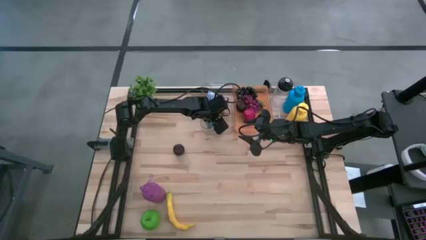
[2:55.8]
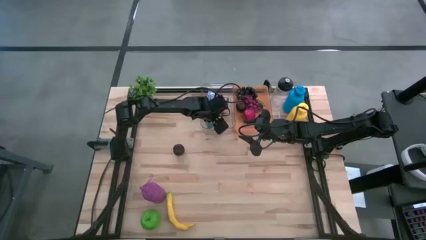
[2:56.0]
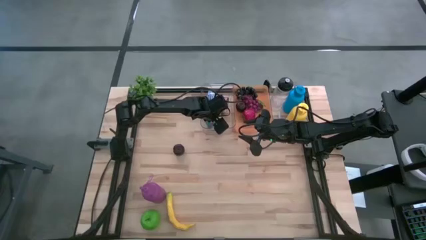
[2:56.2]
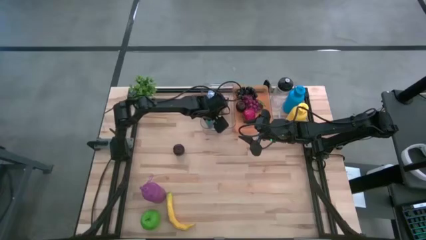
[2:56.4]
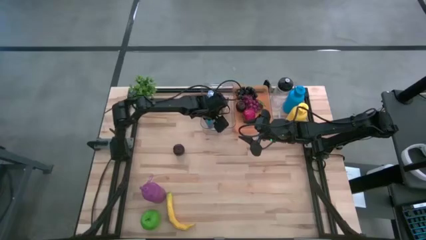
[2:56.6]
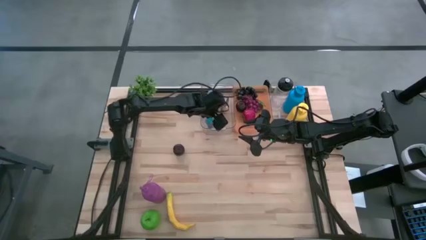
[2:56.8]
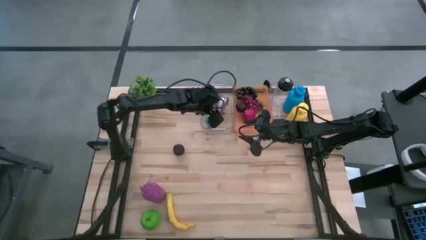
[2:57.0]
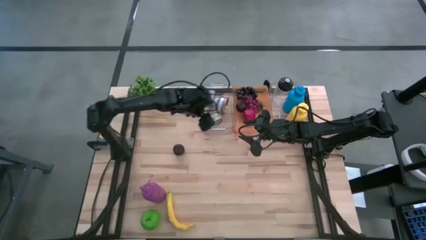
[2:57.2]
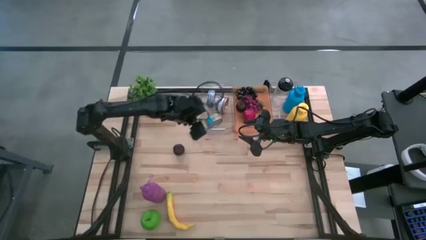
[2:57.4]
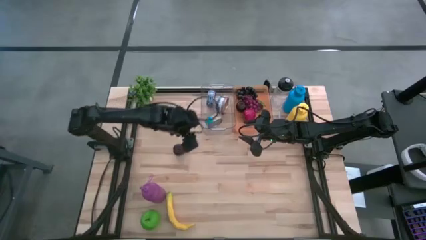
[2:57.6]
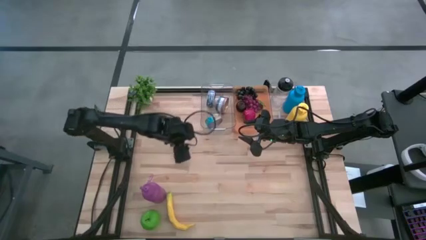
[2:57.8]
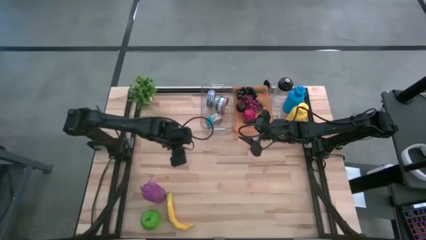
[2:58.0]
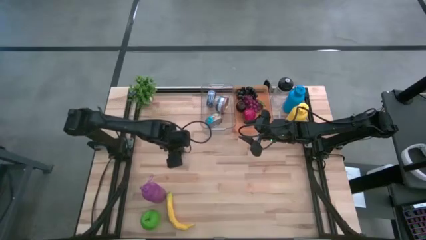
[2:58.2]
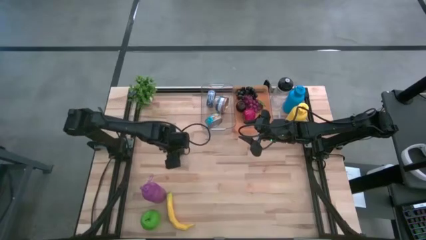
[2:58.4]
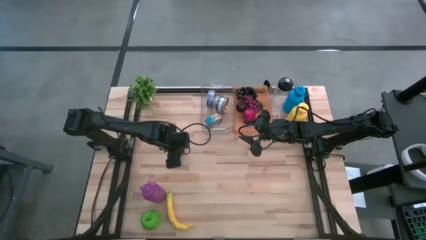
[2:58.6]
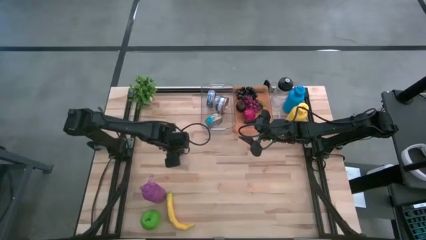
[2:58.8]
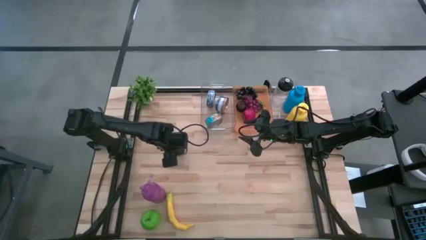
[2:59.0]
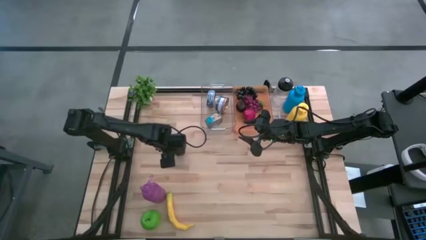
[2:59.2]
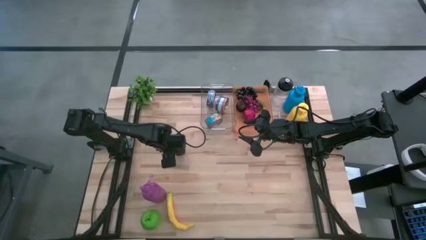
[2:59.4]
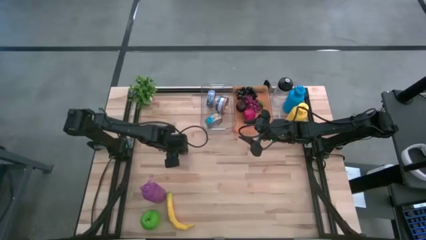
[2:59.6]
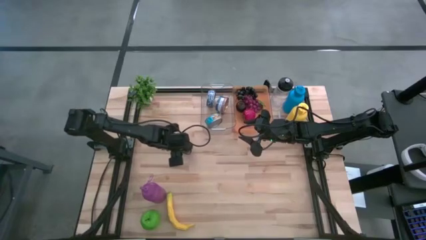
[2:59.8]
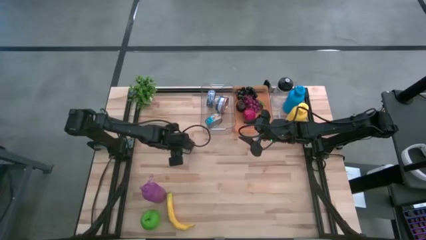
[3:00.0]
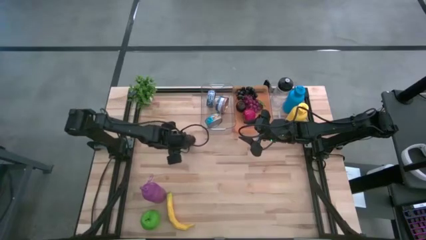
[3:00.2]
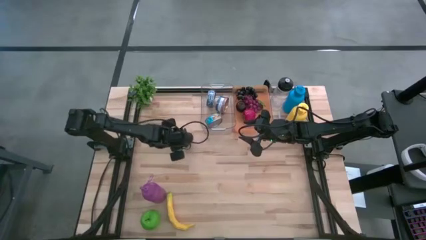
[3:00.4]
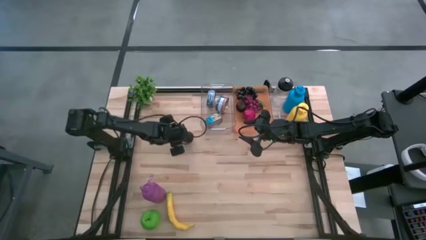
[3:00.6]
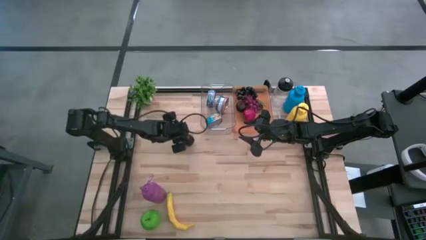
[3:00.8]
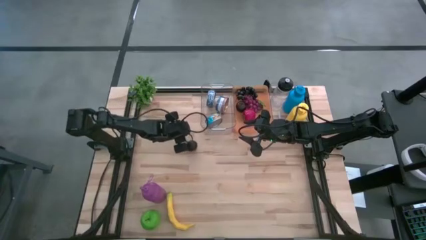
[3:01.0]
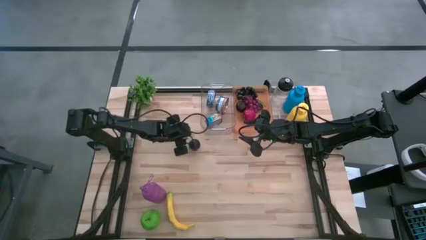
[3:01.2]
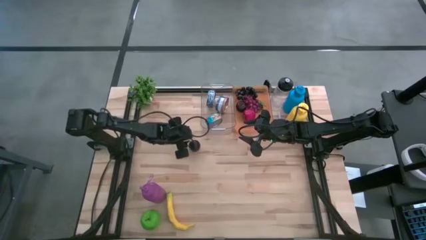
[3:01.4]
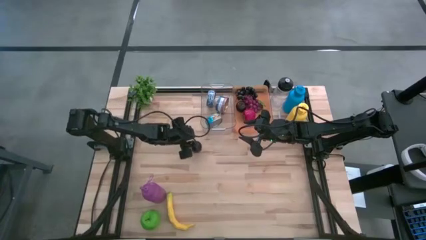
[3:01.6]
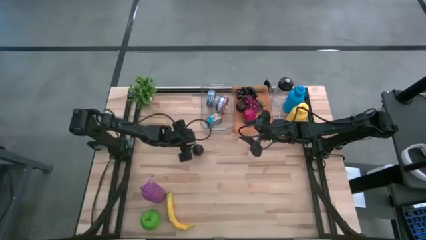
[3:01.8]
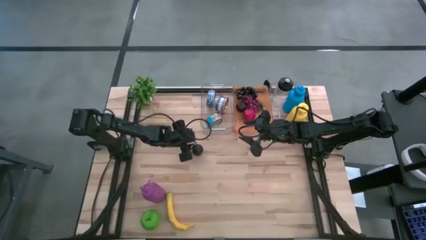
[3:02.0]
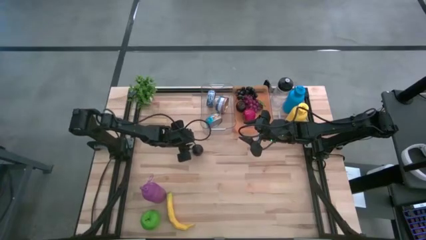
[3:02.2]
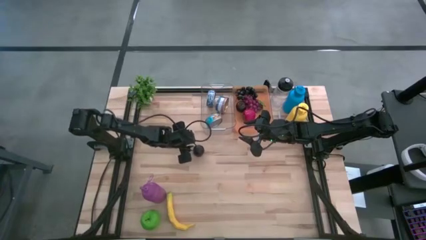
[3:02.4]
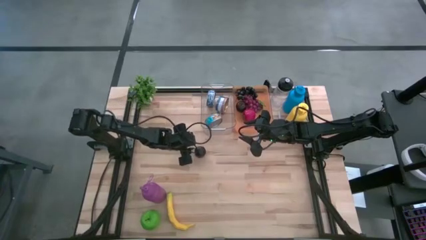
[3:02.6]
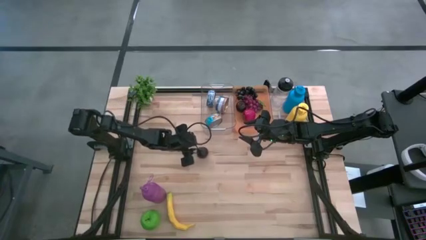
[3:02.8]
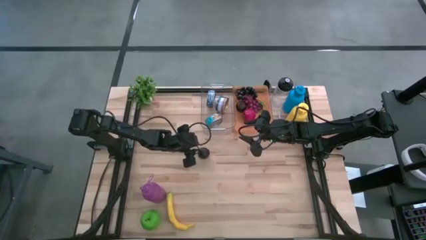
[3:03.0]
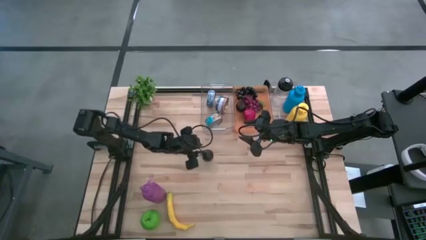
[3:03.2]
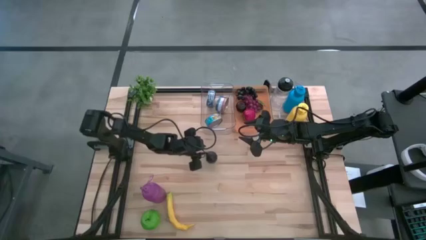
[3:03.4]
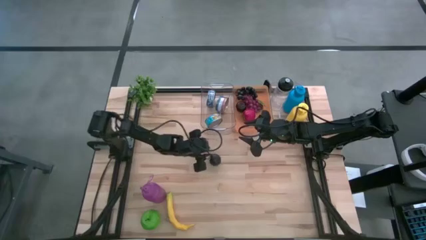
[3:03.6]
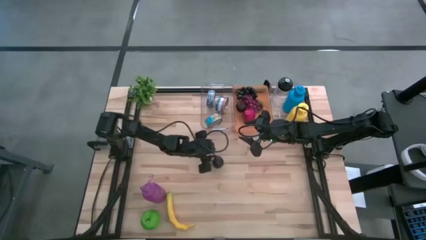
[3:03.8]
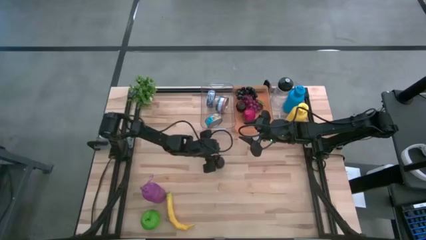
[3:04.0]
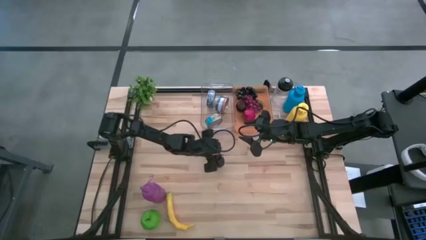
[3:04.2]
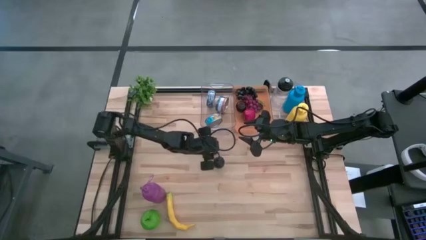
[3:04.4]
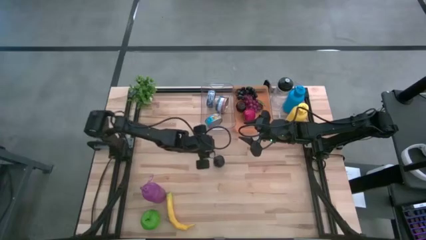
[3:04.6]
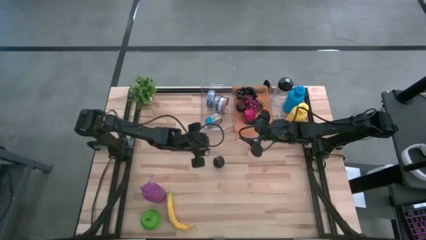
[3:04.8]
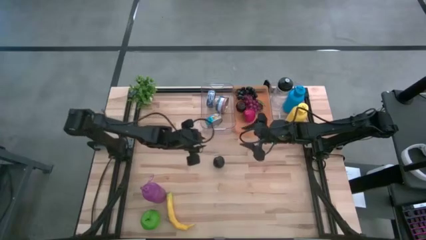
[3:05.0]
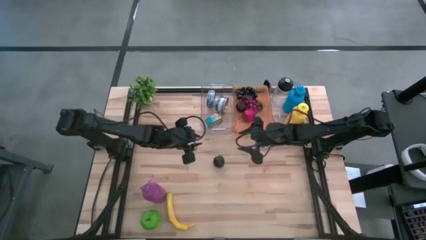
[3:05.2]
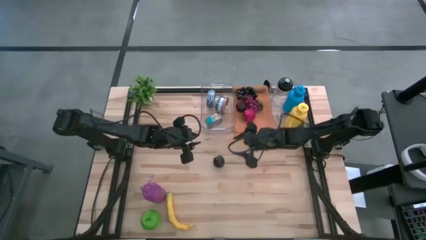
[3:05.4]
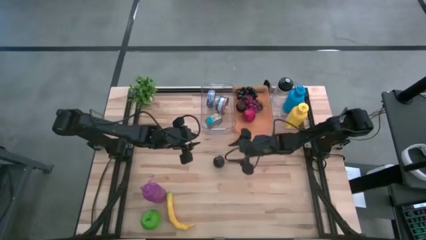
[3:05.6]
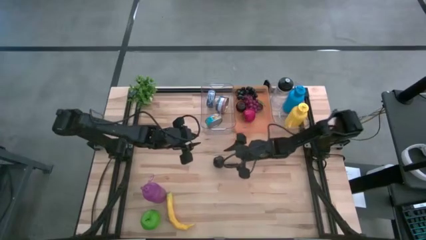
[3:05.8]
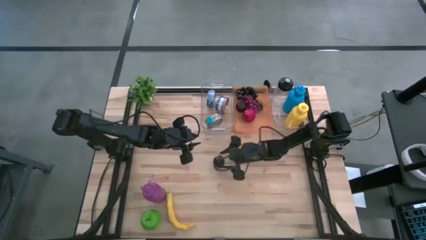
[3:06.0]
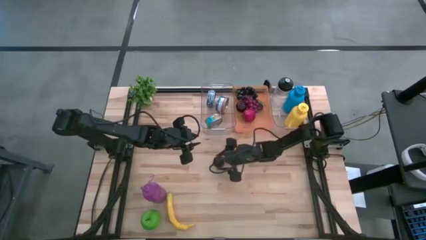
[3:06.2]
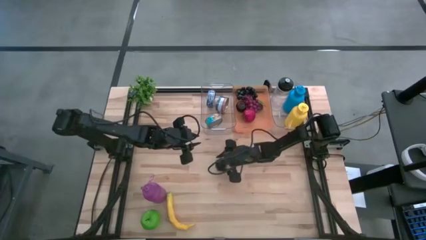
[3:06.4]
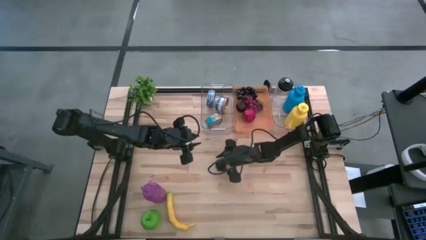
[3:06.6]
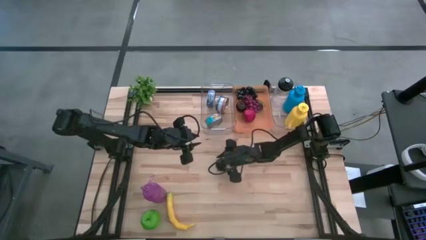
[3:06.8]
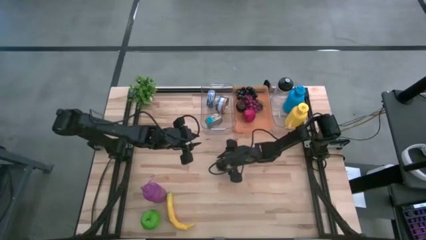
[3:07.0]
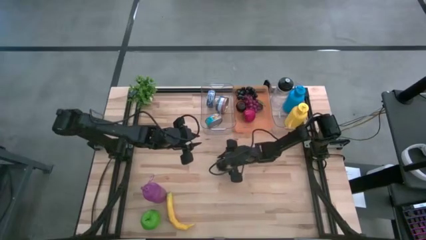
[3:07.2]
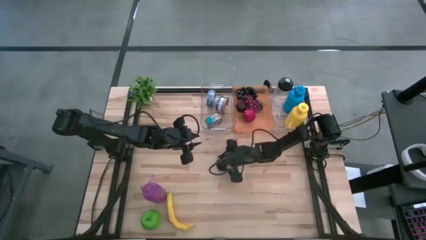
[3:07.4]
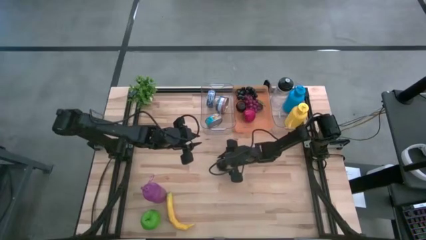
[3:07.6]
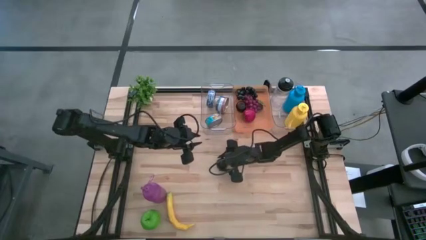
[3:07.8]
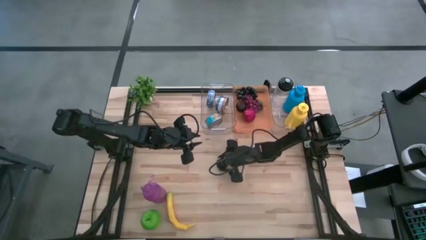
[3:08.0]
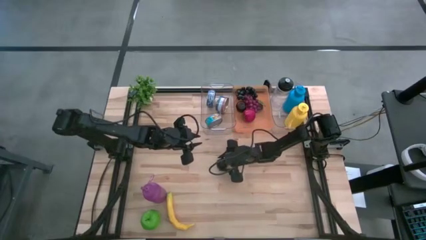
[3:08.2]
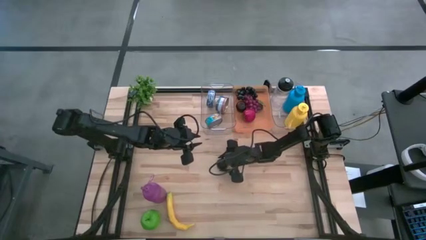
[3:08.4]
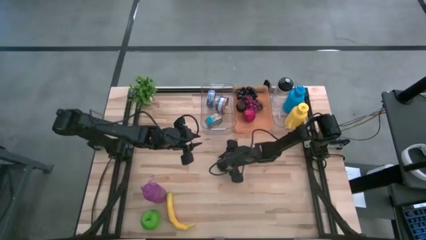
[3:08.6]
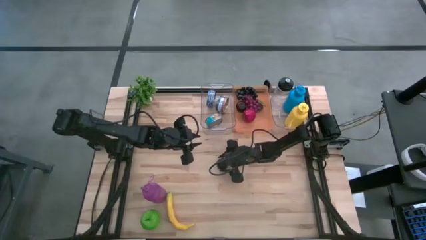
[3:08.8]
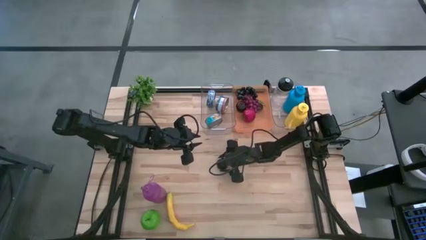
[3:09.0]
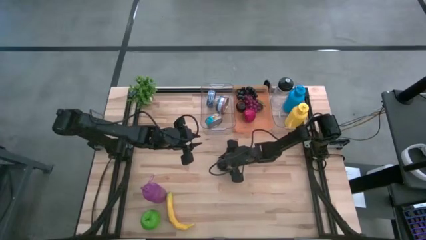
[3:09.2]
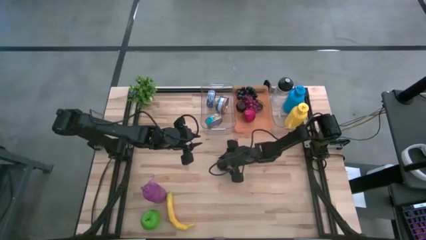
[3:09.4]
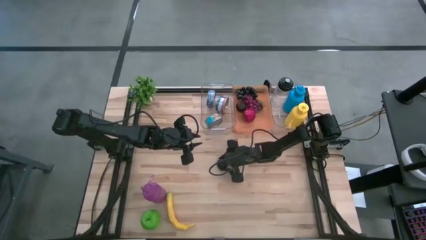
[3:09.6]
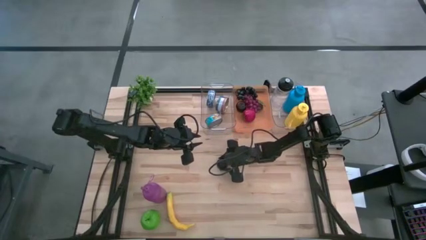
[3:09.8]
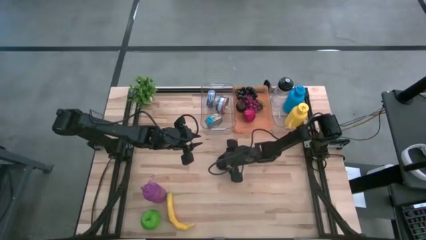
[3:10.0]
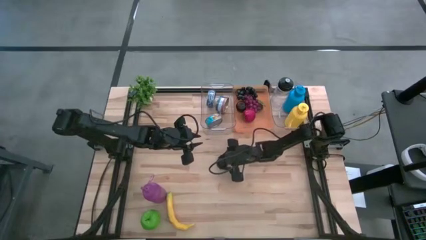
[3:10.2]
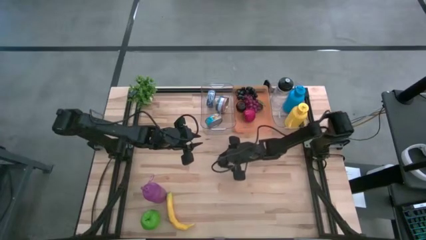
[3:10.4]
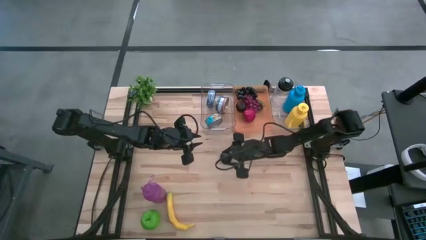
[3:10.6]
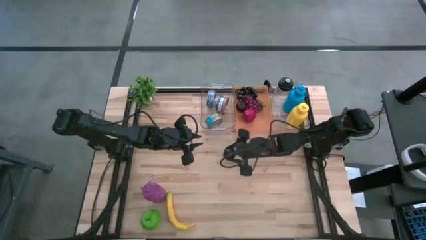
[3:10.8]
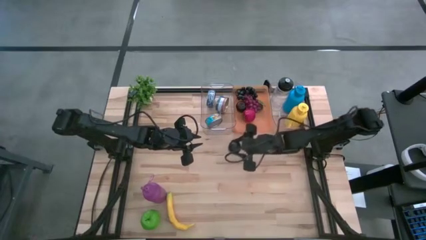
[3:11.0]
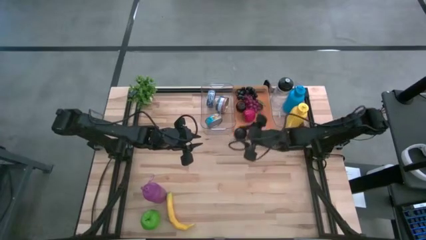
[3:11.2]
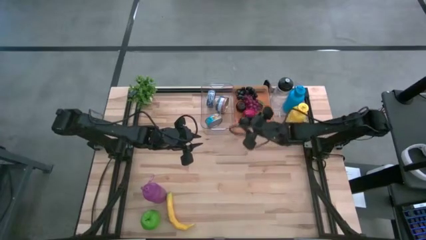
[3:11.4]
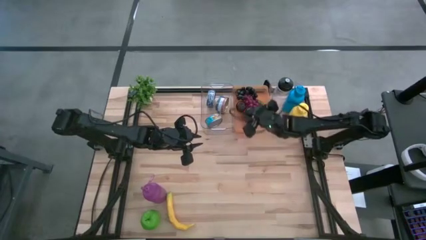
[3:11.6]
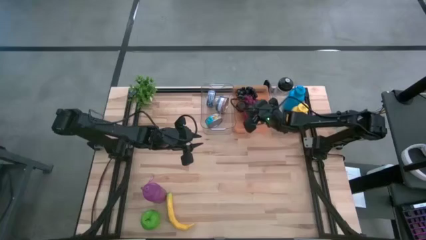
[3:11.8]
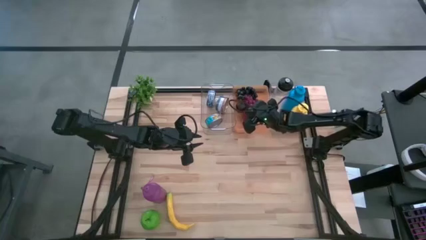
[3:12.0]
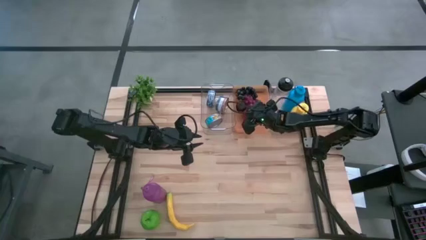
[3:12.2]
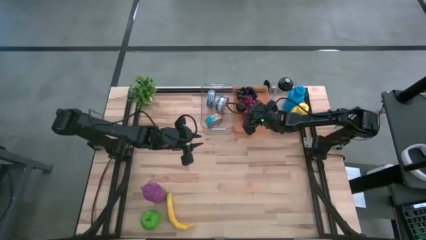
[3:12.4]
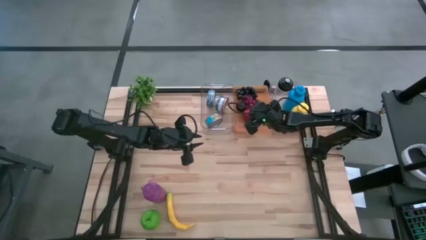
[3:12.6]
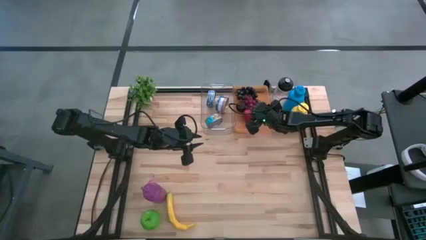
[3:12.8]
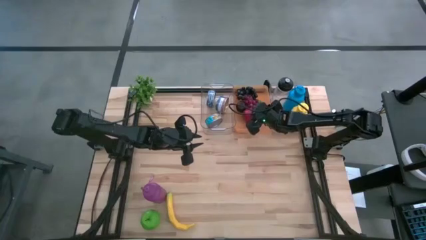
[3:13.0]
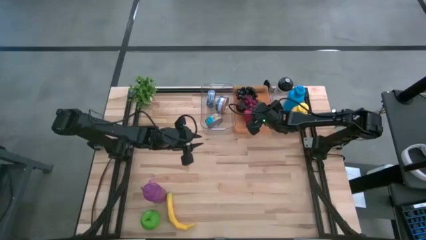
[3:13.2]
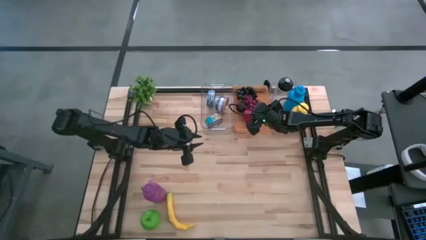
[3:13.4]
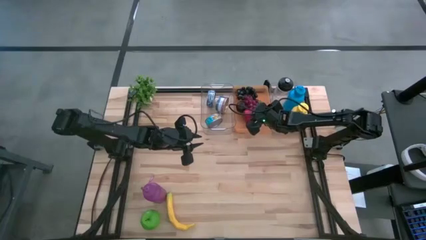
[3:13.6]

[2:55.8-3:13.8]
Task: Pick & Place Food Item
Put the black plum into the orange bin
